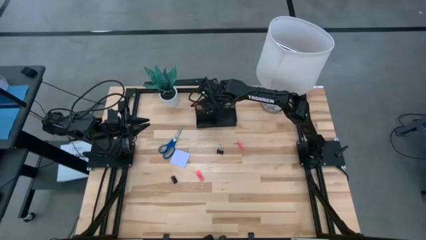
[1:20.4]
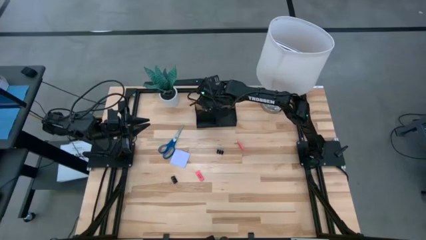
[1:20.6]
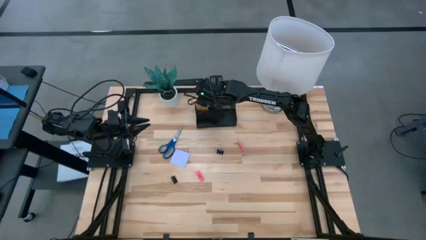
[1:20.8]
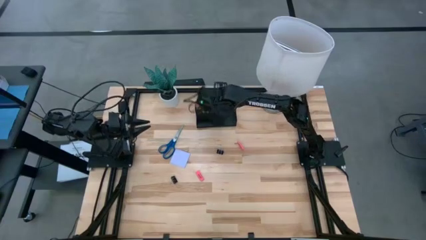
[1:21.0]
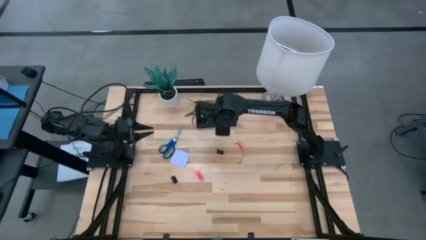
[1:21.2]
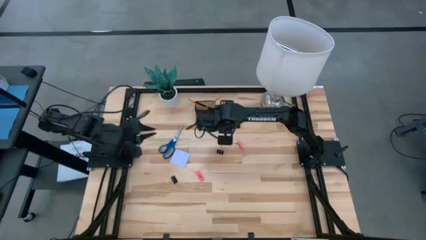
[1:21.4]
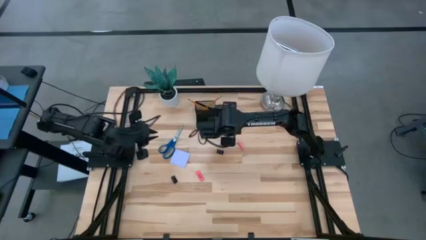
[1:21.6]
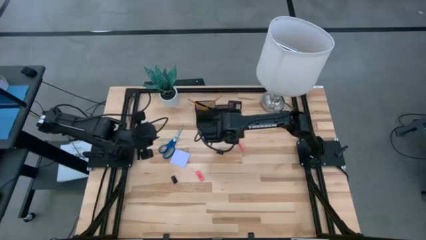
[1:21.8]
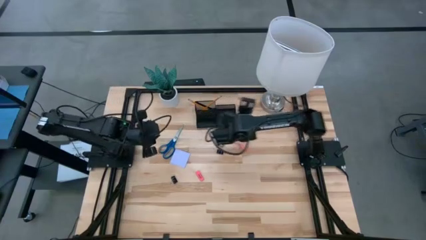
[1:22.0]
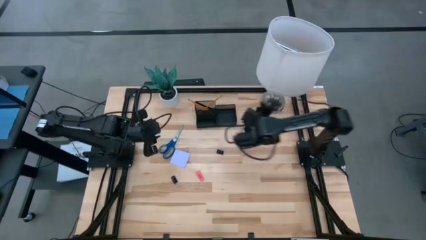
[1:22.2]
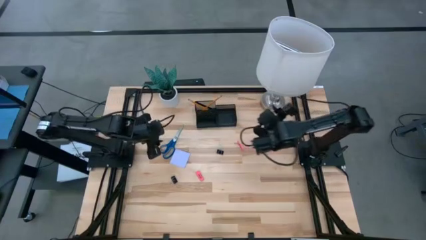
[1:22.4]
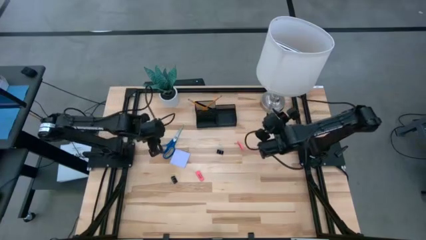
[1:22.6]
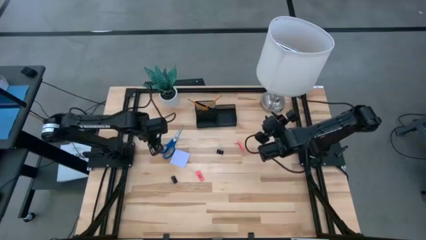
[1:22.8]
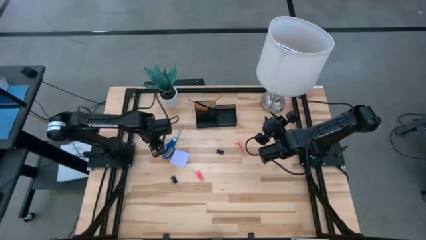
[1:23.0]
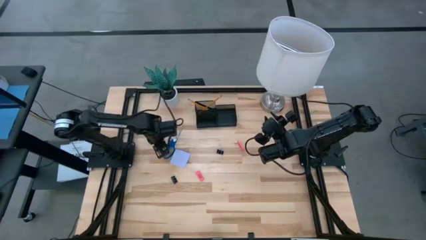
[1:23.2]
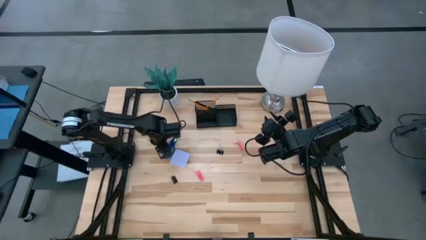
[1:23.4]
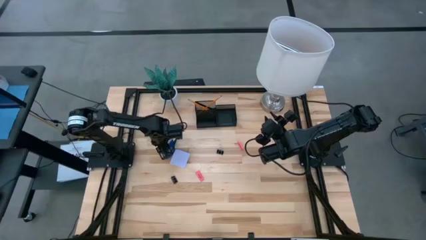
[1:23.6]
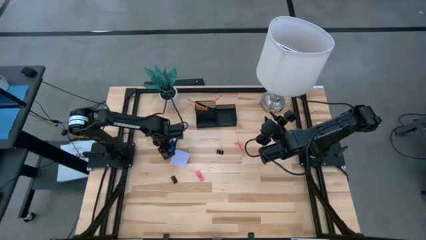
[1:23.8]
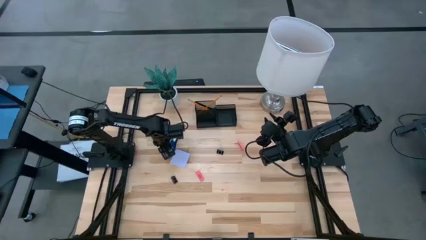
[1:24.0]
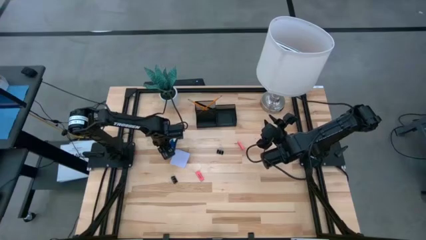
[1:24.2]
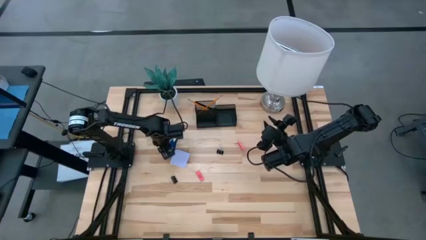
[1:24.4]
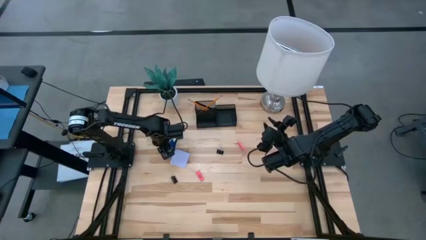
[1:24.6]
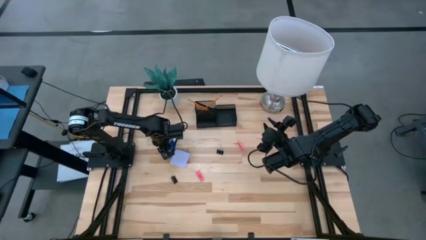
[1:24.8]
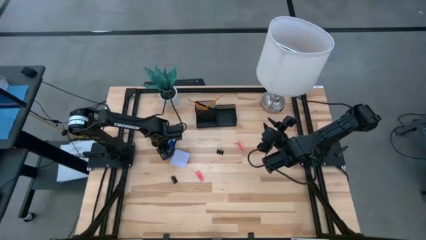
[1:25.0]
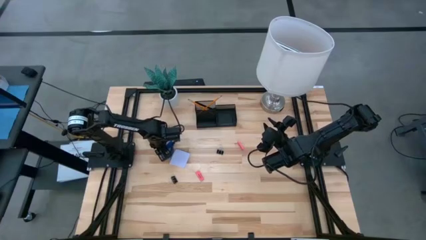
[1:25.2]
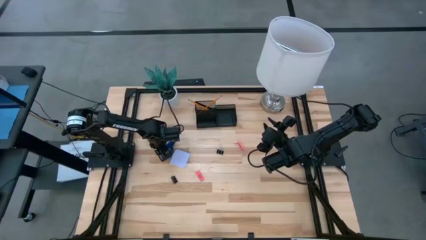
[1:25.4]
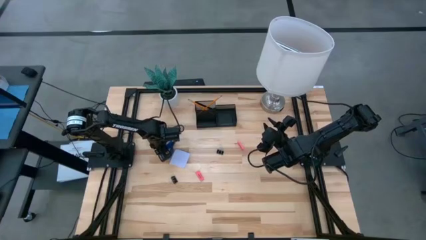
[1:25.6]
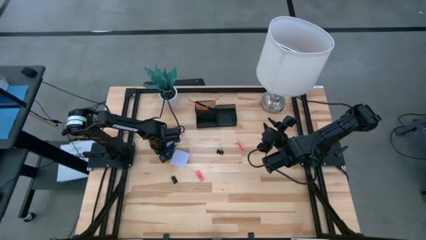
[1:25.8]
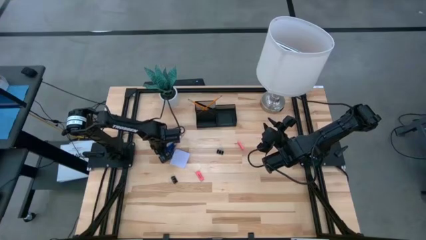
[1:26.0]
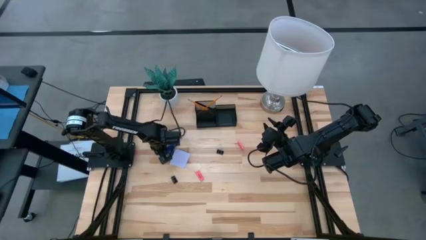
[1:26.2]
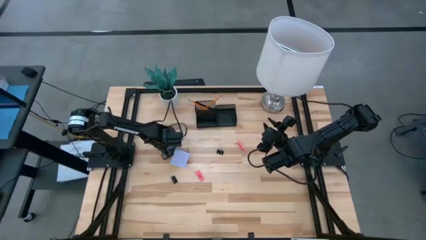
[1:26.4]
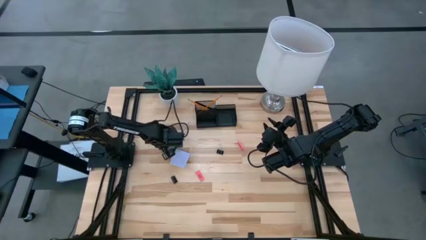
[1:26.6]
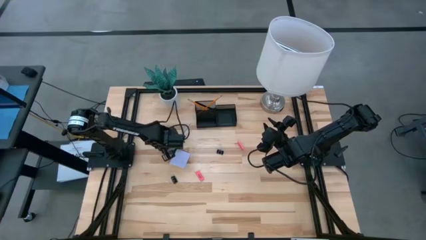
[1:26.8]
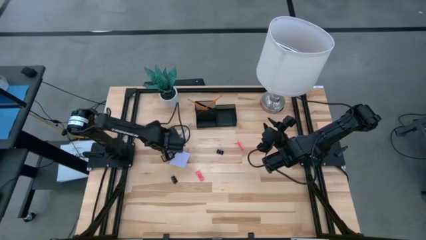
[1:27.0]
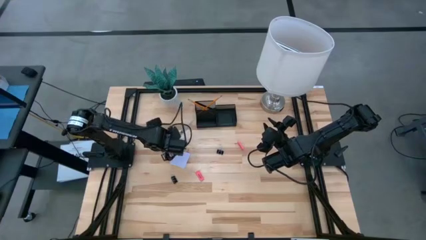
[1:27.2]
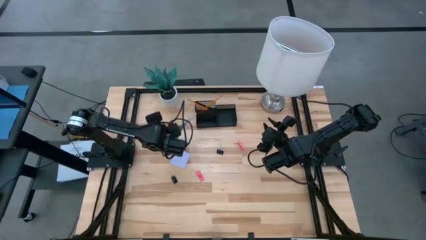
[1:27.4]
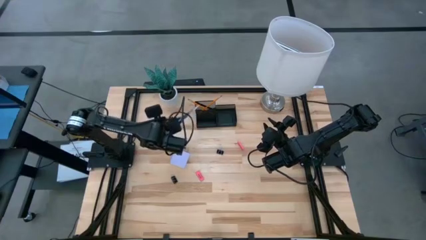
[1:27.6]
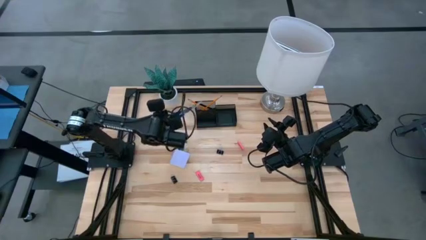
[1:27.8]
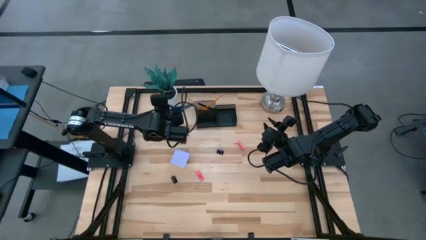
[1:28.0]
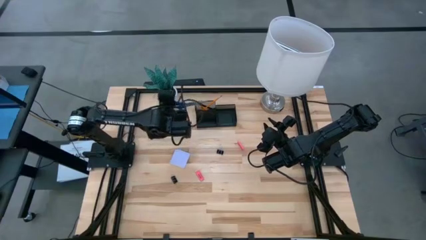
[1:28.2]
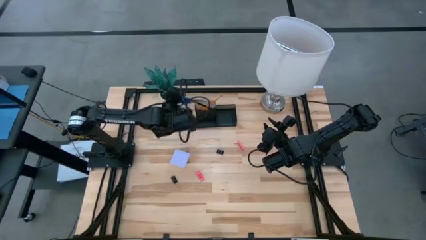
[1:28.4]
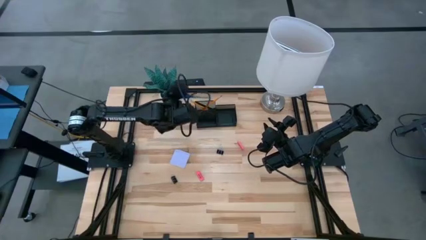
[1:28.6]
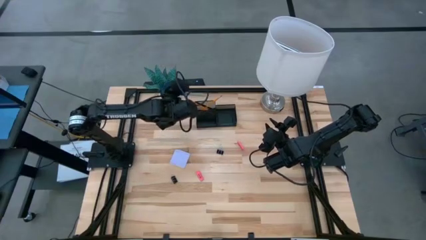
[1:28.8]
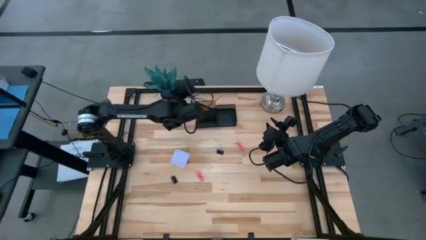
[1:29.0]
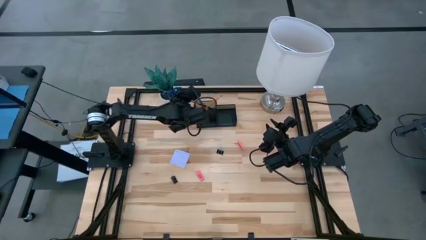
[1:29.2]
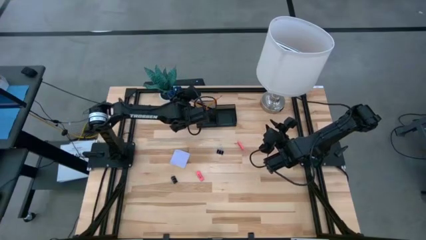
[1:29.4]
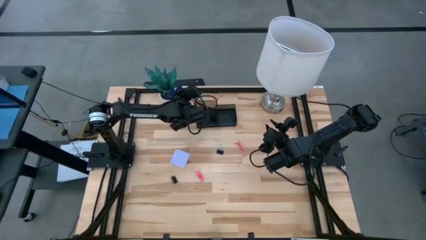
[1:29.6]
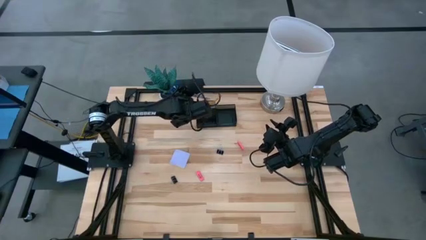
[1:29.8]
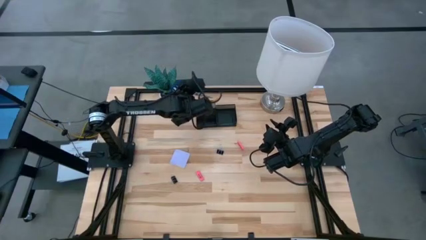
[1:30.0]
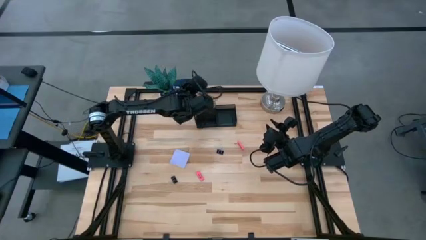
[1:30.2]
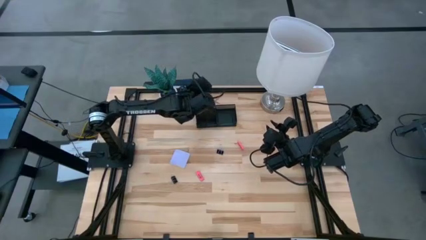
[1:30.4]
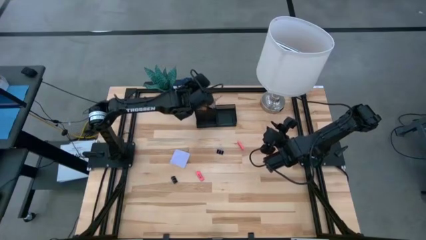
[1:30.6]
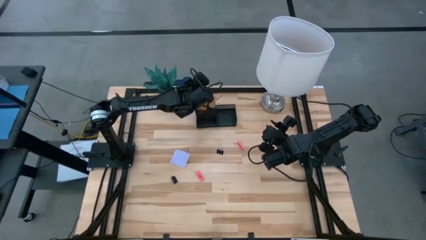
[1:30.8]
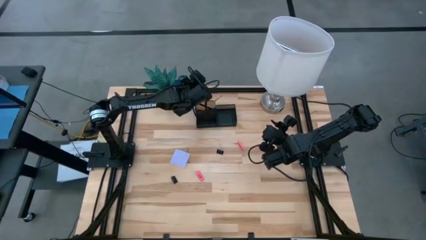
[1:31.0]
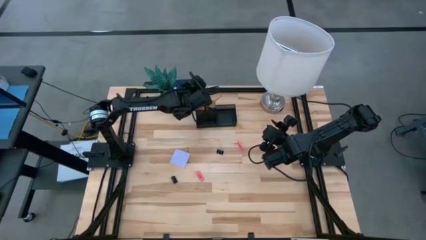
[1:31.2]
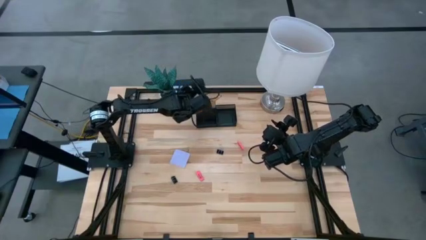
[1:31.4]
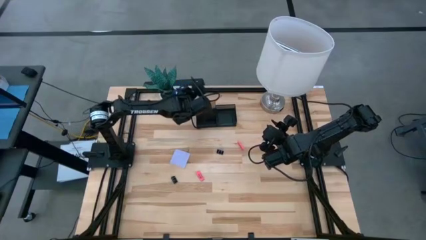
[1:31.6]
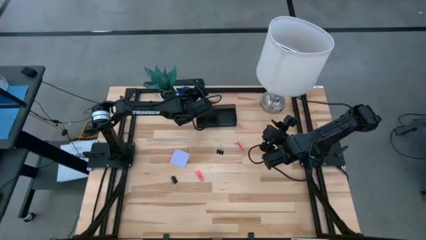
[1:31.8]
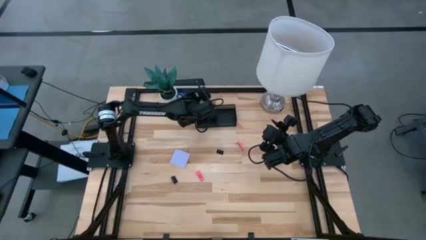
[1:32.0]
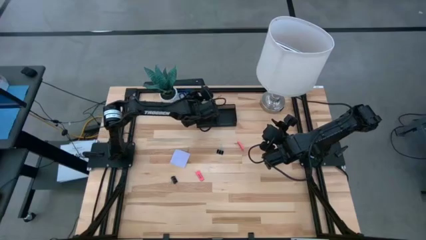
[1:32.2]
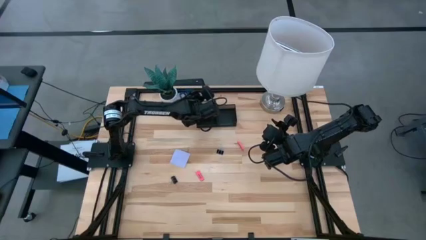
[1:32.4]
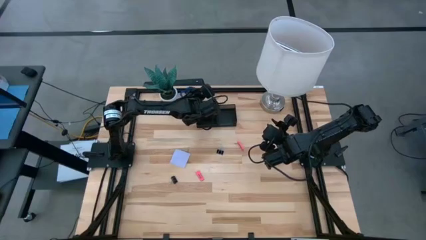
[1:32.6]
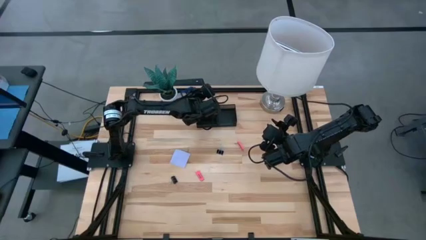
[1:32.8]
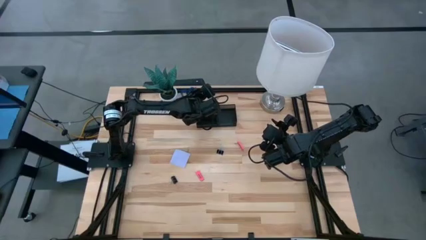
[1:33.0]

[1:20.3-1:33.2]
Task: Pick and place office supplies into organizer
Put the blue scissor into the desk organizer

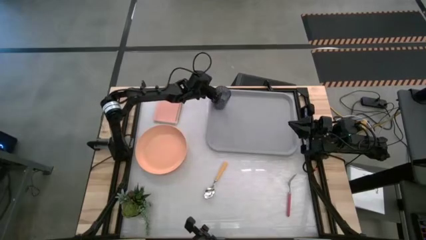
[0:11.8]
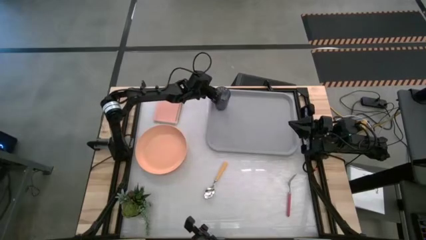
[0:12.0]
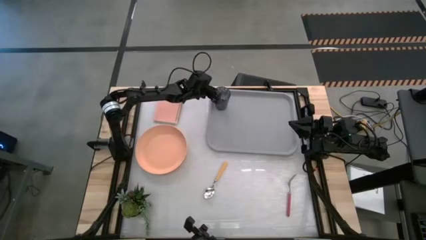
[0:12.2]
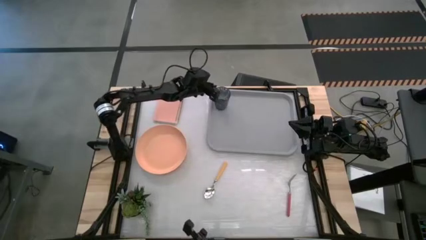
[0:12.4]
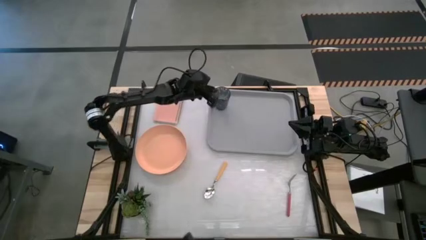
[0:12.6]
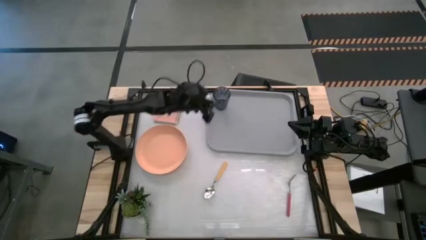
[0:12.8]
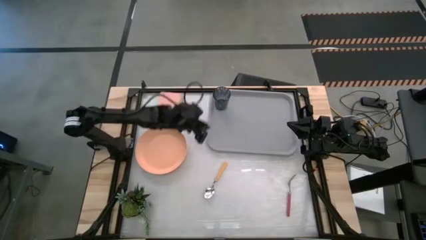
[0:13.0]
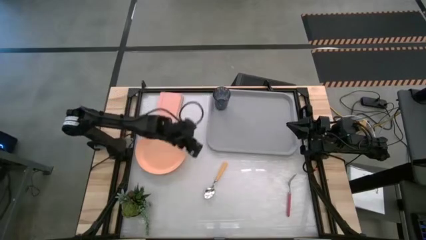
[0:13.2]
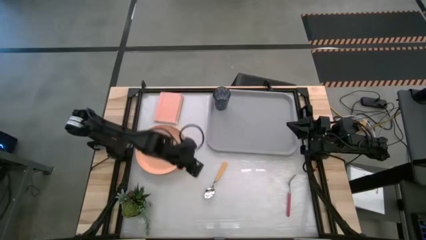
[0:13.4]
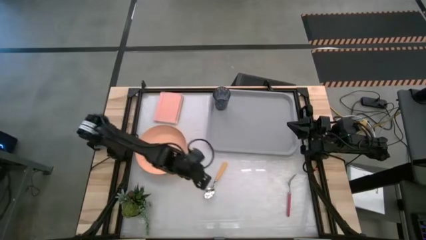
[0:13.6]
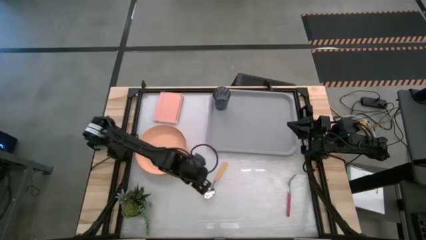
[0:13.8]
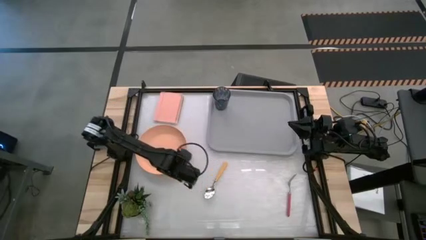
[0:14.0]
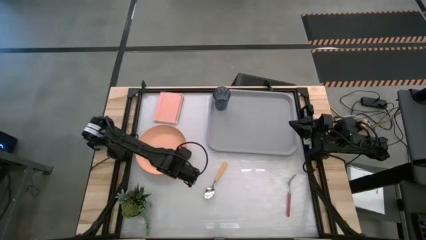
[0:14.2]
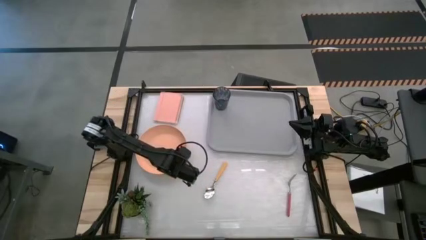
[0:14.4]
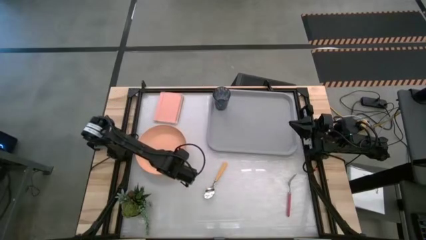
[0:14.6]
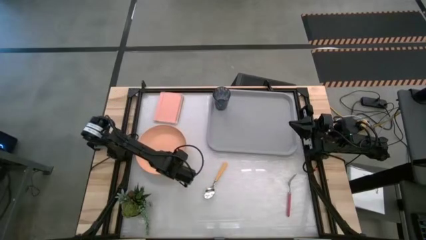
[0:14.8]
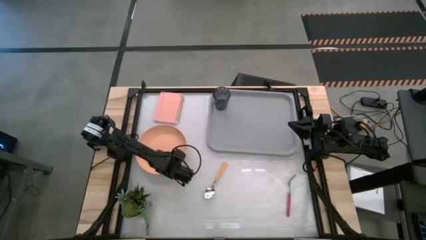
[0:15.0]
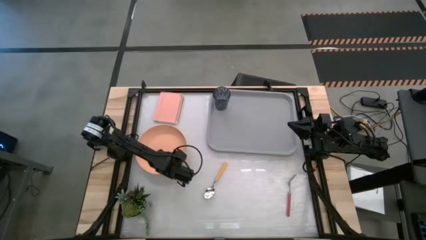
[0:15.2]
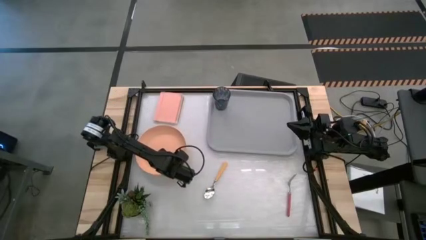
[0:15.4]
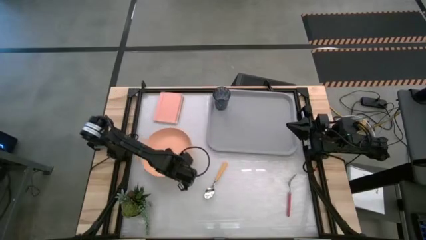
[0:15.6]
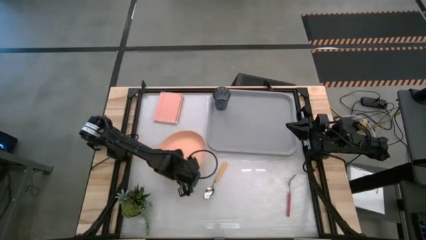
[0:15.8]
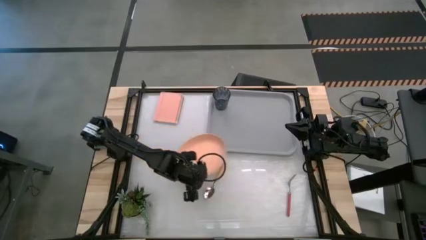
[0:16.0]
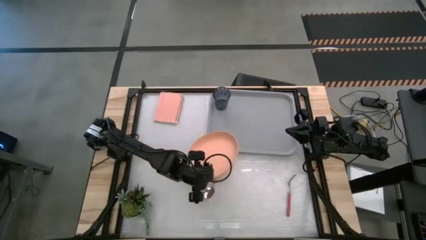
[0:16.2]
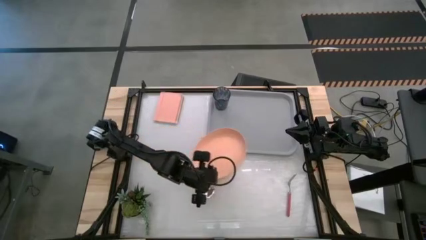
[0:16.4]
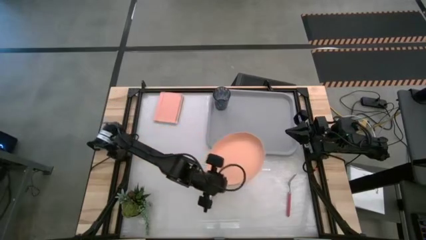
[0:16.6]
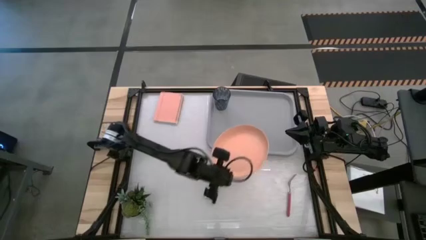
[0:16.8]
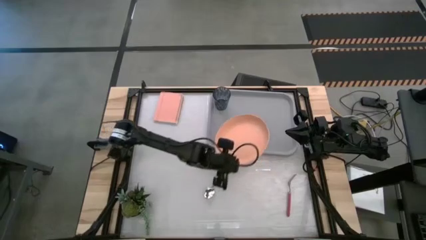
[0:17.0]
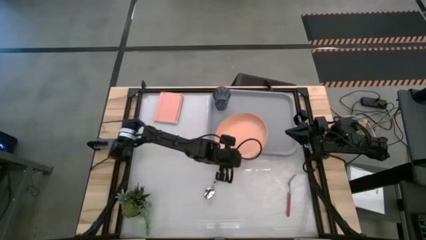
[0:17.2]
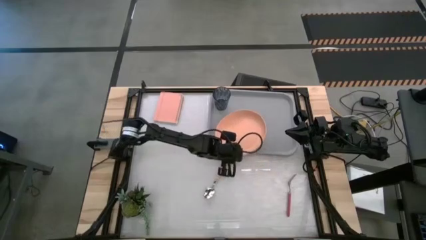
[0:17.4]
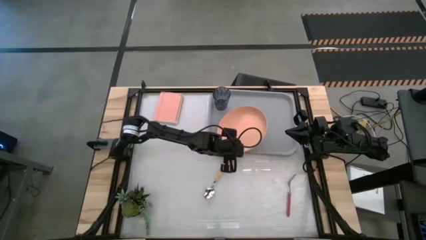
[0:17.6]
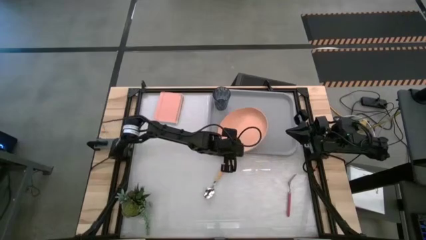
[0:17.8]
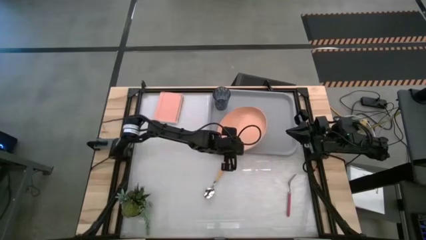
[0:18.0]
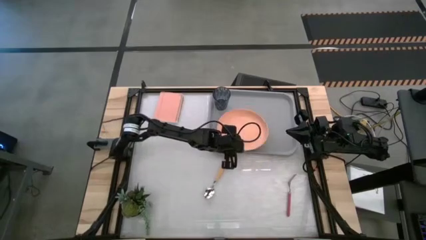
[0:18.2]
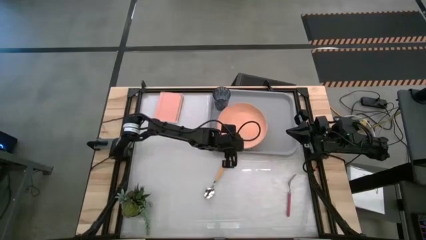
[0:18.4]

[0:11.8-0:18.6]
Task: Pick and place plate/cup/fork/spoon on tray
Put the light orange plate into the bottom left gray serving tray
